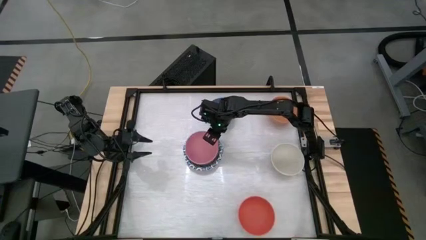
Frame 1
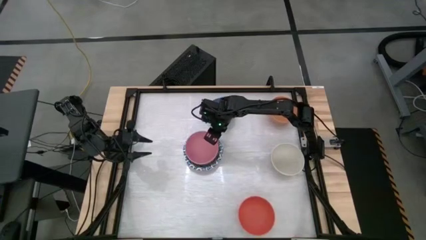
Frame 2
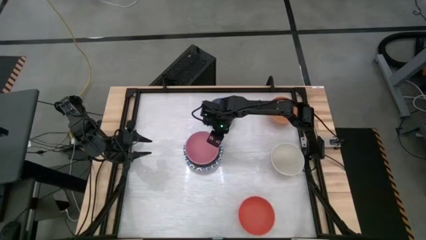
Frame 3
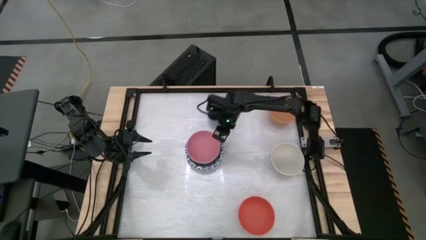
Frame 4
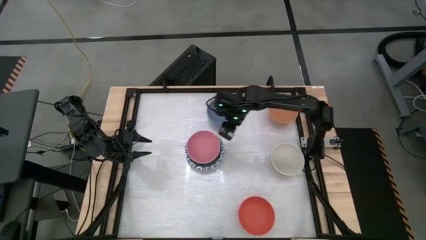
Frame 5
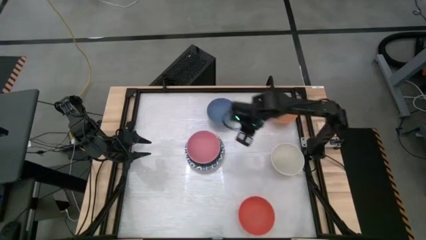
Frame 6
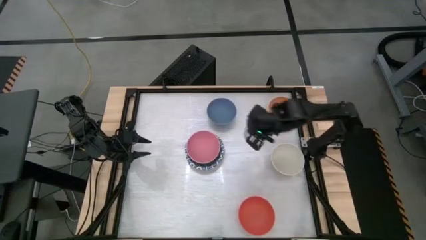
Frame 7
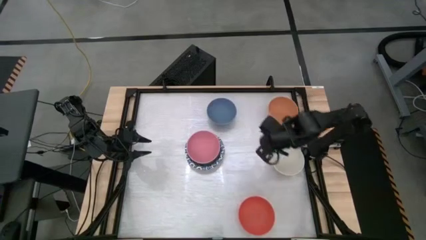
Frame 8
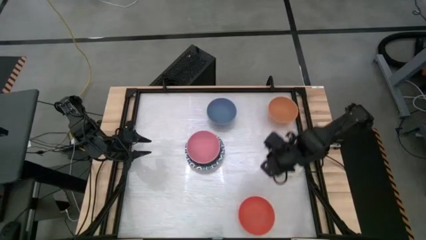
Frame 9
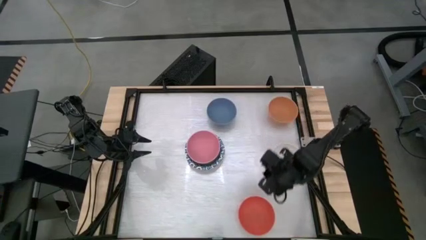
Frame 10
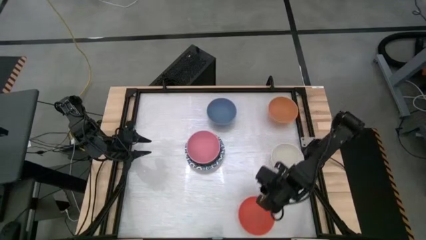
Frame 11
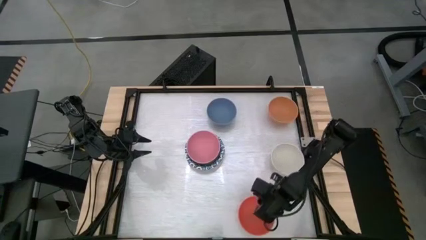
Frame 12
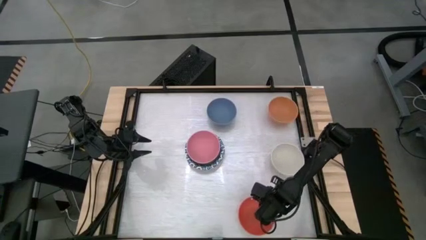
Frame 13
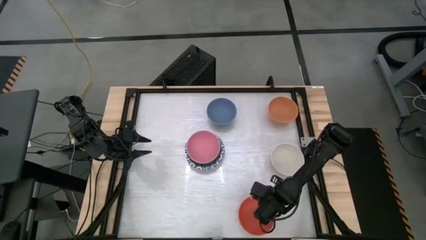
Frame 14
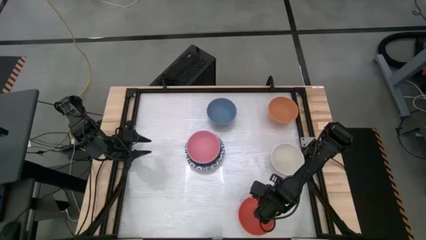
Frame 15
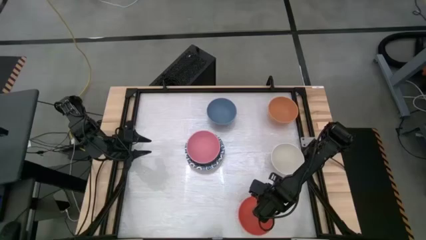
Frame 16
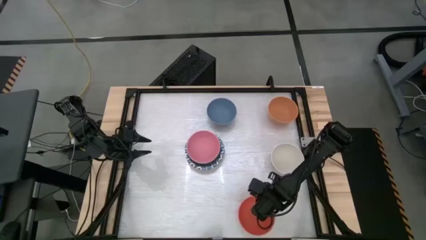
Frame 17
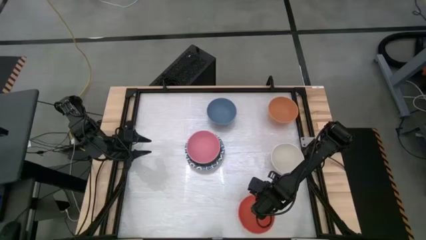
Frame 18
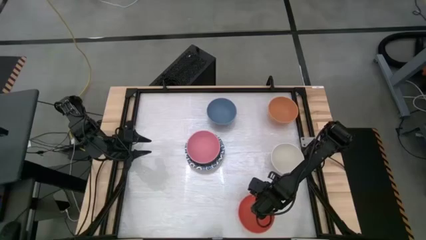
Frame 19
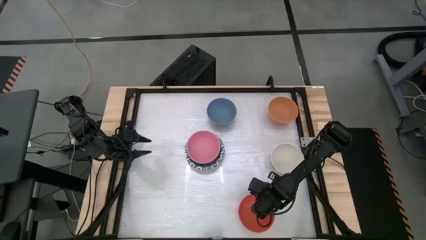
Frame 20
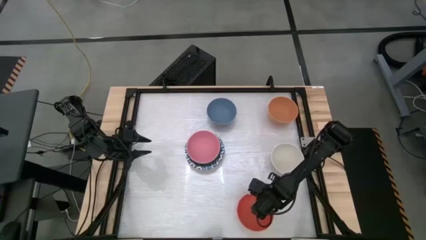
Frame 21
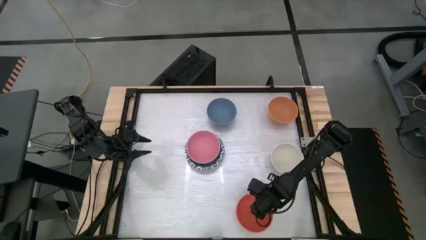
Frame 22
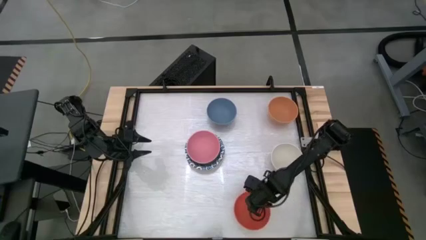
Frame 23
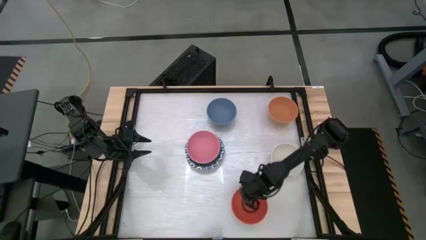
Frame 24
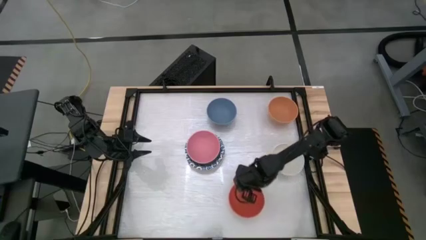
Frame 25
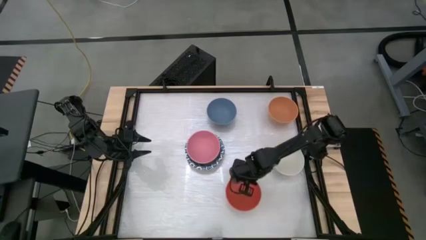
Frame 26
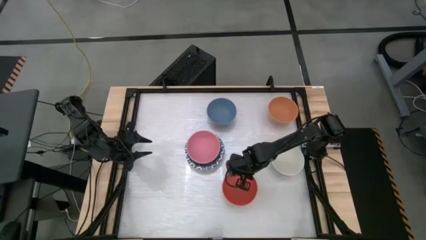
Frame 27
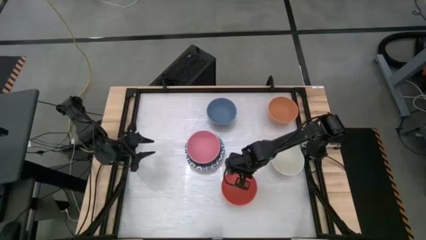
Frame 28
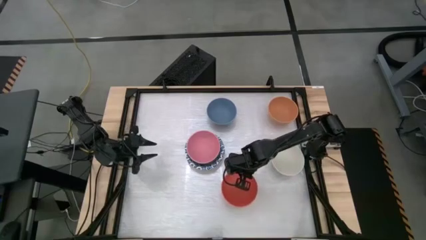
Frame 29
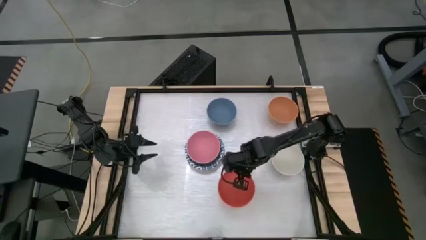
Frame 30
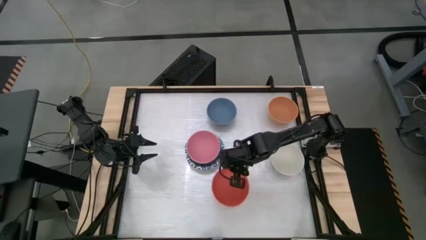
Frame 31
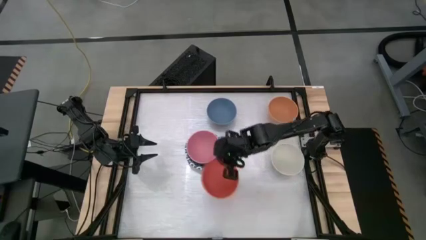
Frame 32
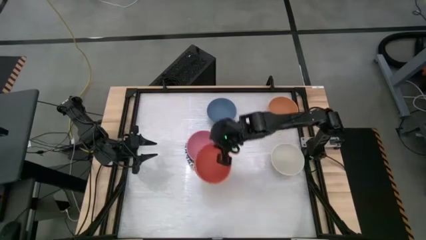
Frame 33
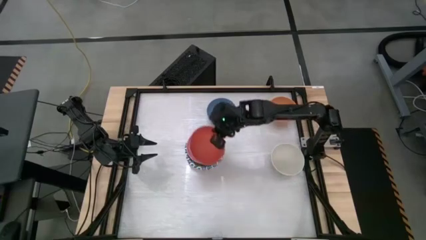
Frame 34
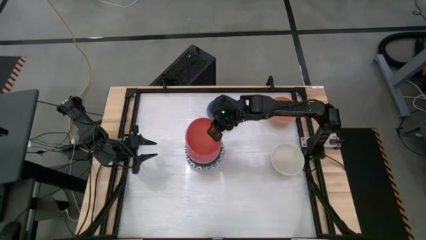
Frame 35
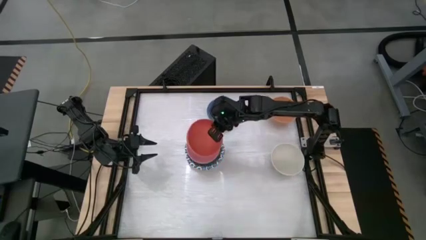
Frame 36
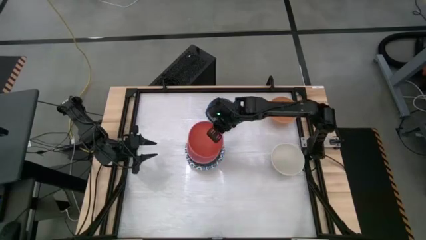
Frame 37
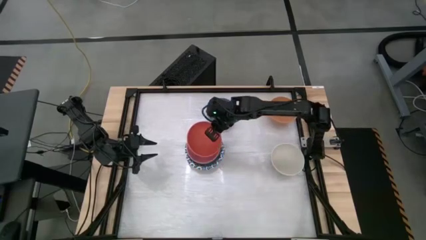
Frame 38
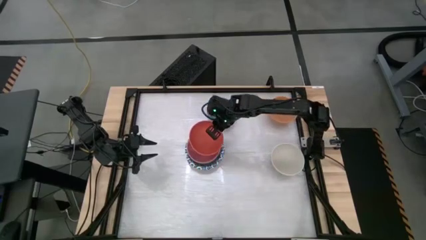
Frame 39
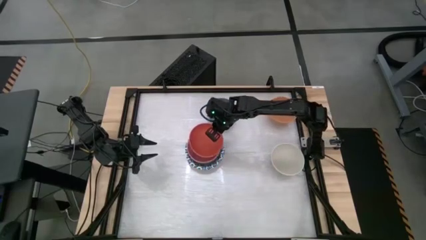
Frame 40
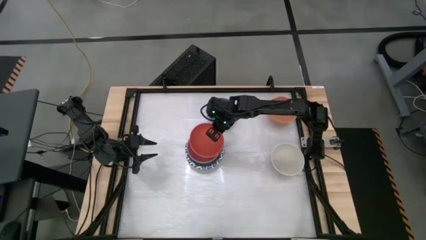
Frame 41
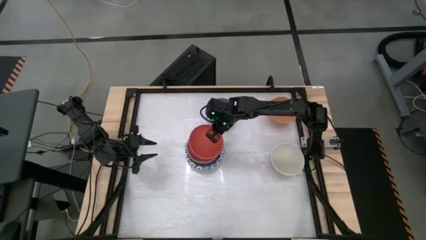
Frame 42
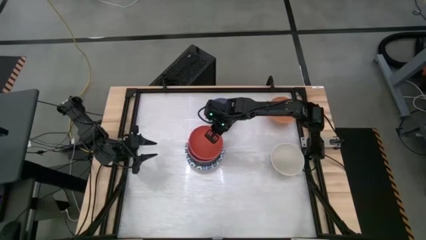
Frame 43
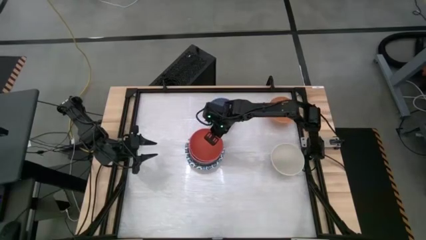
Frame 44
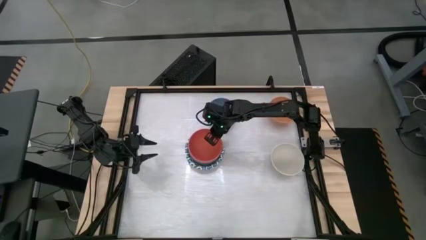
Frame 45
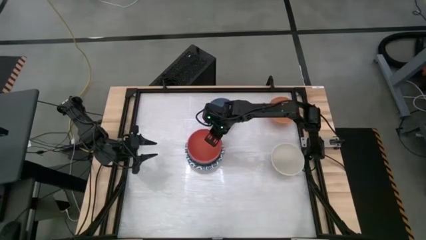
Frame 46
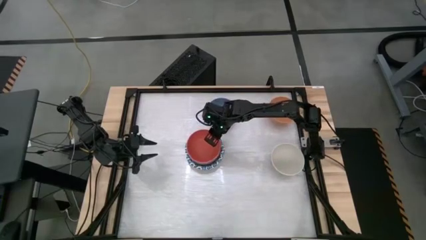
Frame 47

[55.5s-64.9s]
Stack the orange bowl on top of the pink bowl
